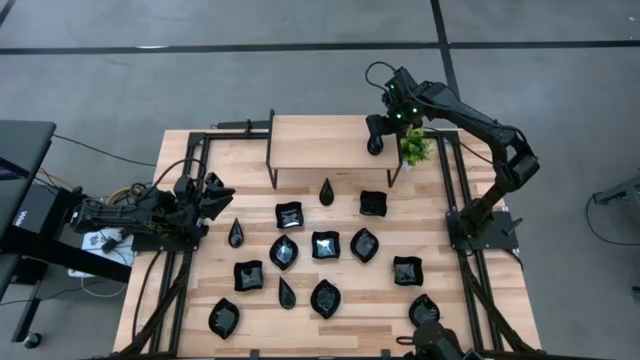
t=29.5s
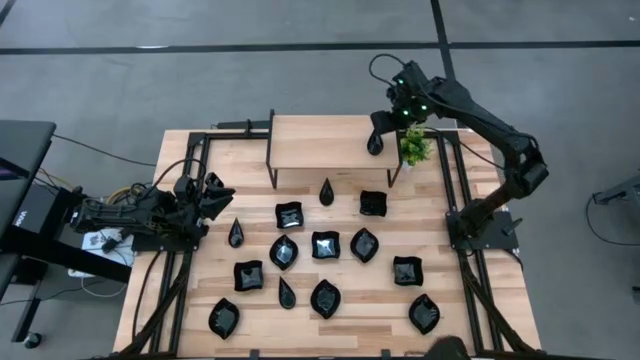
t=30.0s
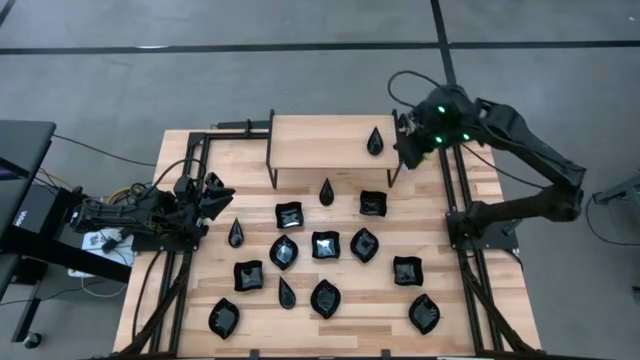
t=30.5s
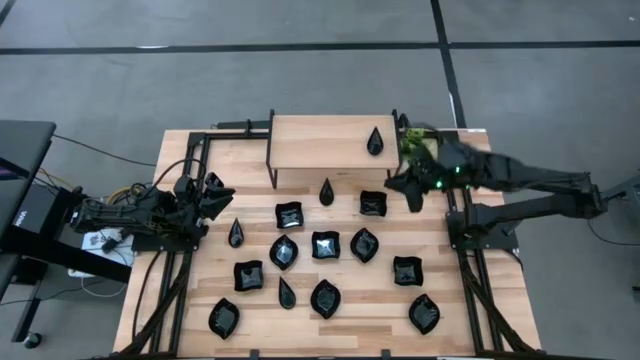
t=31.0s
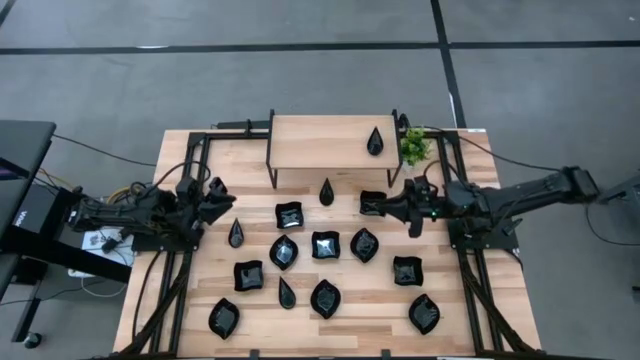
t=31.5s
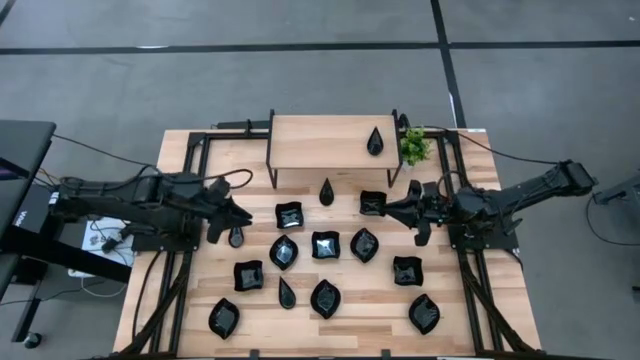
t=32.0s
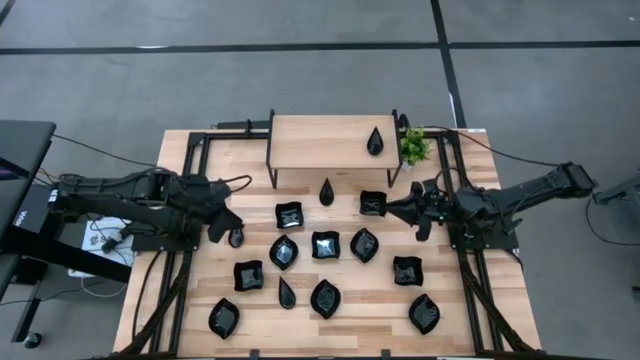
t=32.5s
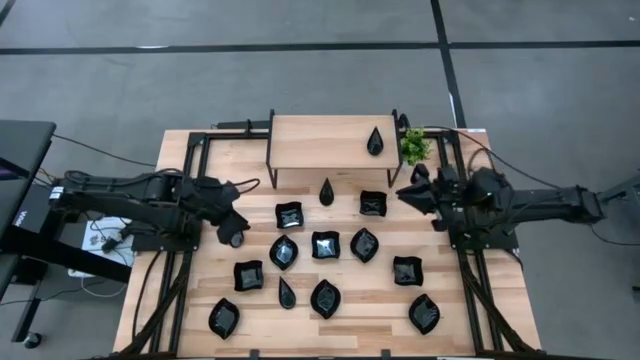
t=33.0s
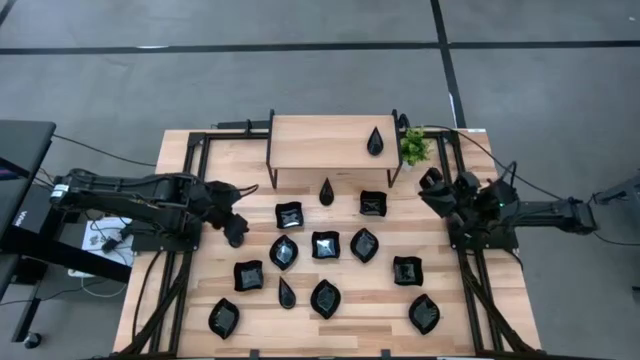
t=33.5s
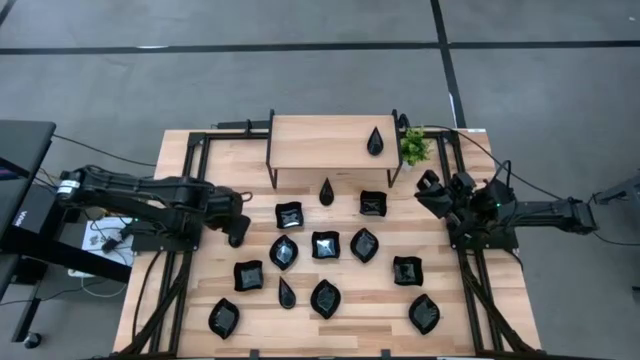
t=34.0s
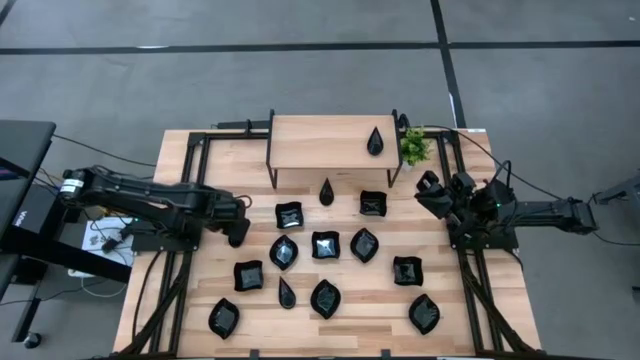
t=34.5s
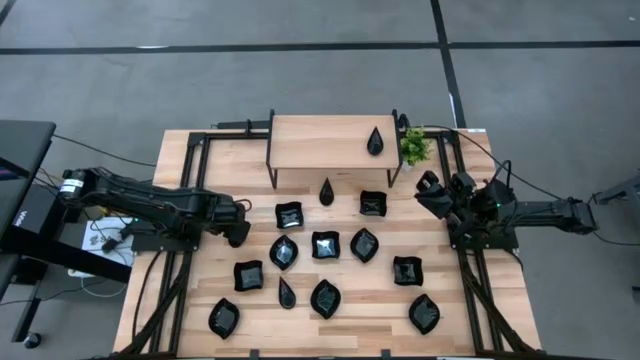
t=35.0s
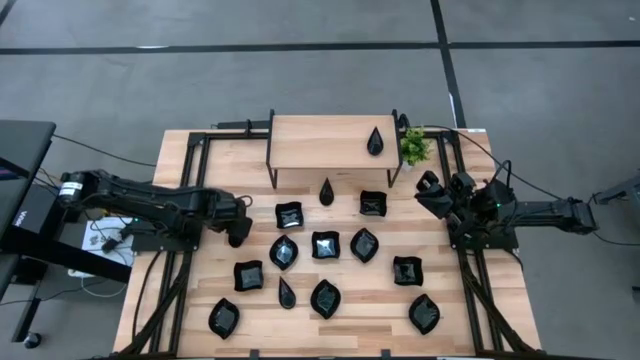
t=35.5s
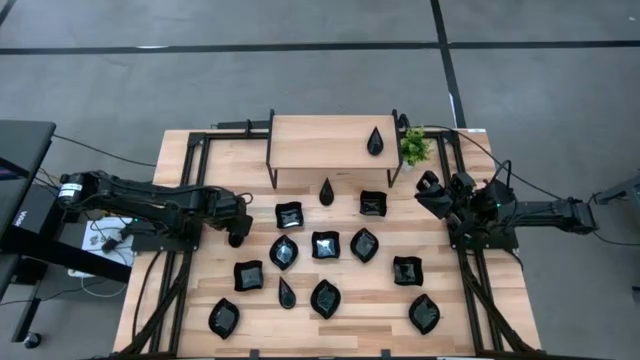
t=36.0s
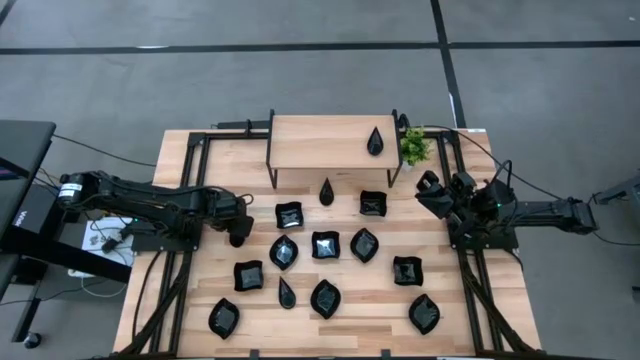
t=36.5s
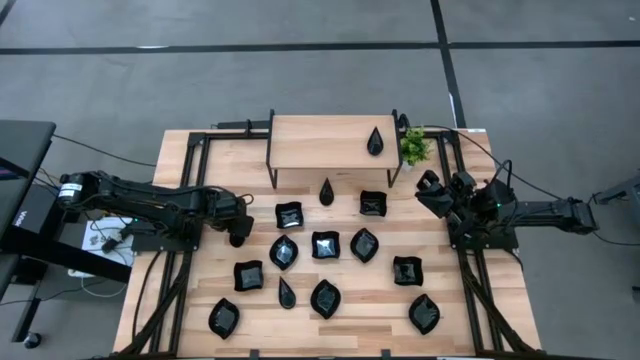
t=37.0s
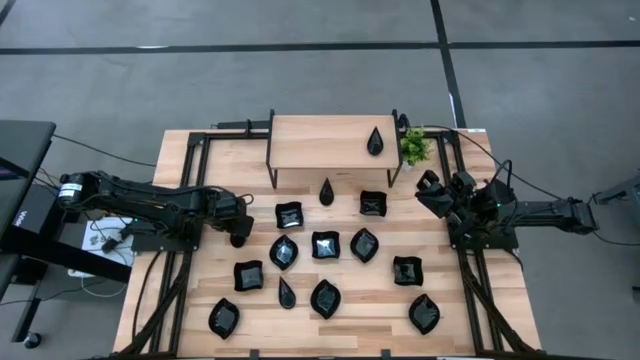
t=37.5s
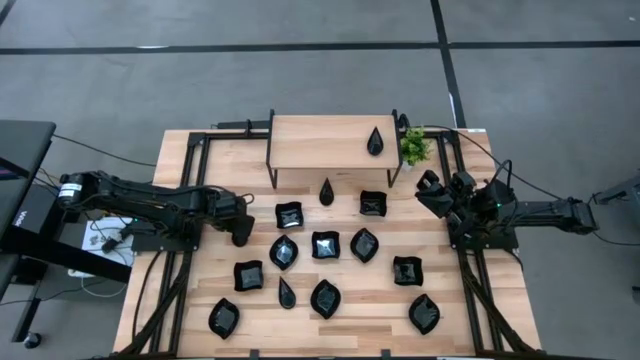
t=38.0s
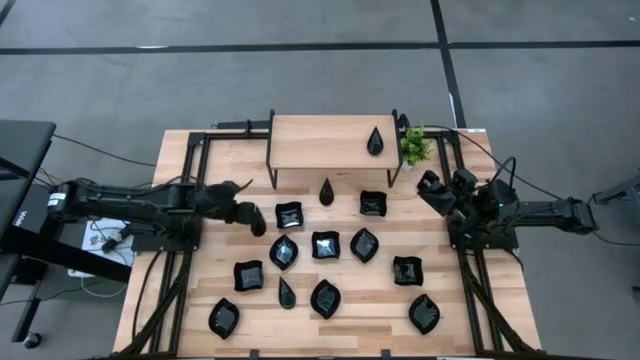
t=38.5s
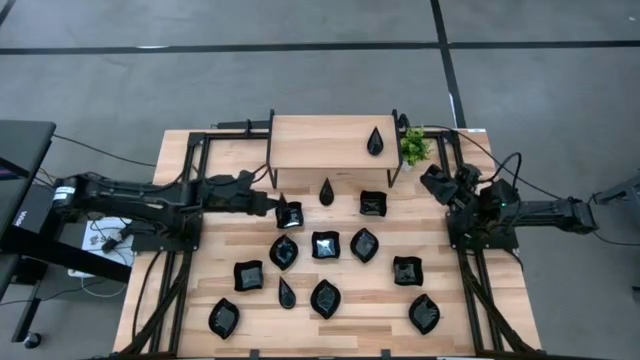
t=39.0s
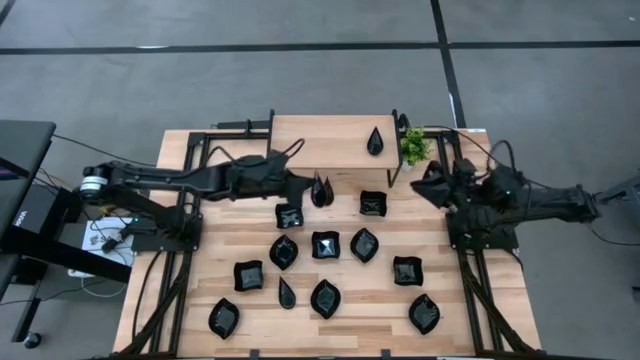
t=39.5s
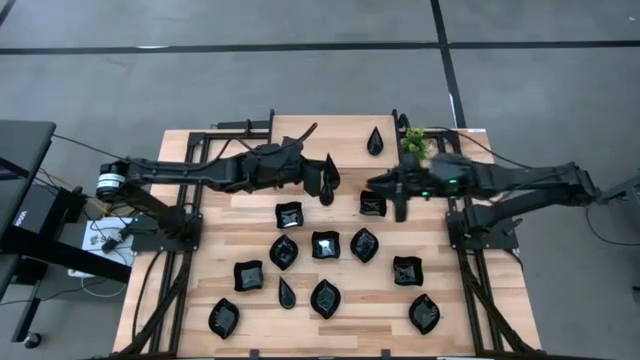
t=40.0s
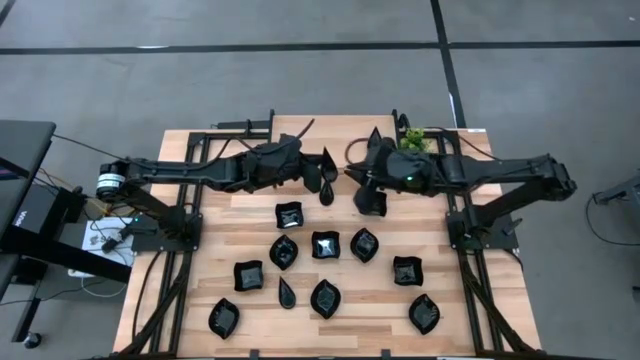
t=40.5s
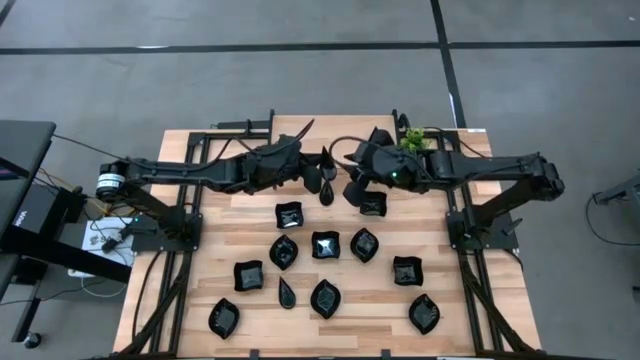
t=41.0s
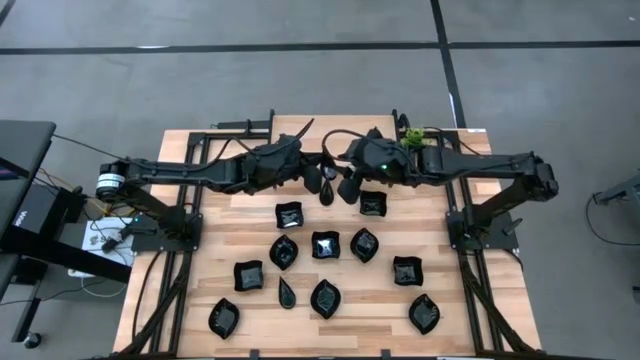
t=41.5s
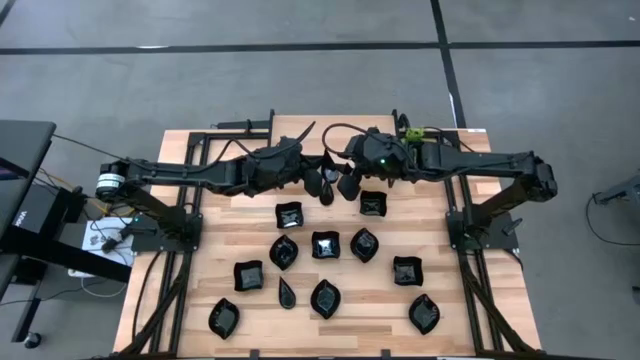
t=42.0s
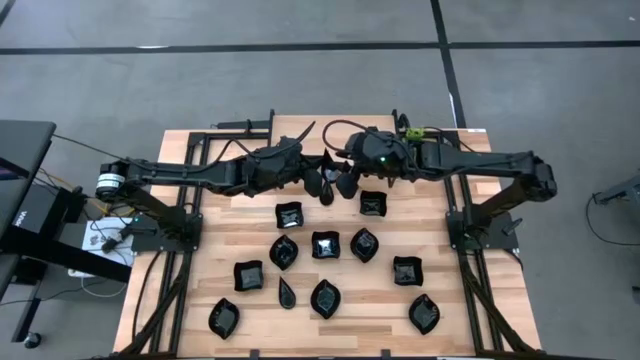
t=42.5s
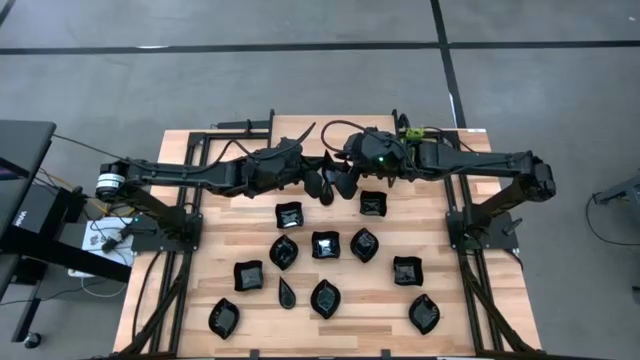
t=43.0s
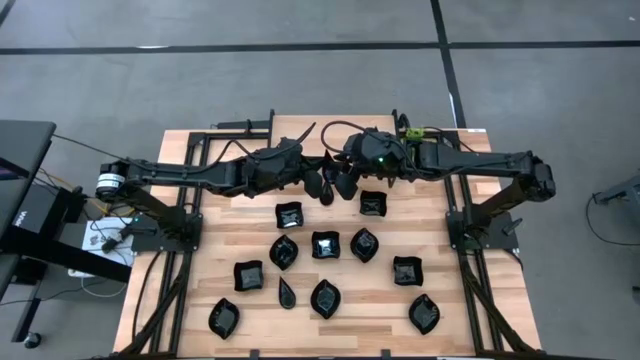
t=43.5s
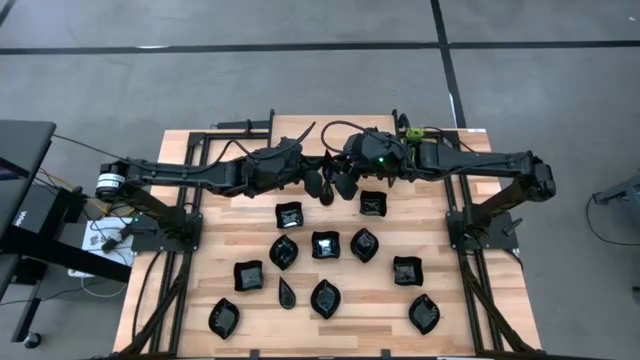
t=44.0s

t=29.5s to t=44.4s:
Task: Pick & Place Mini shaped plates
Stack the drop-shaped plate on top of the drop-shaped plates on the shelf
